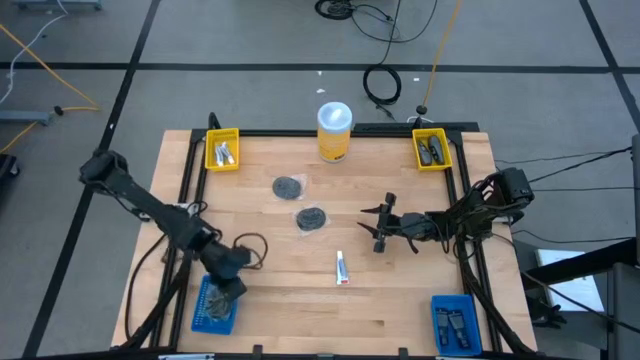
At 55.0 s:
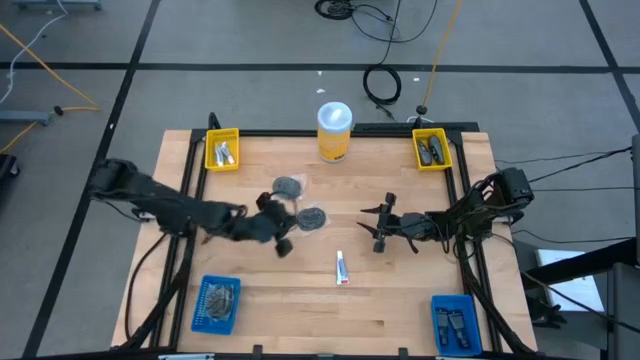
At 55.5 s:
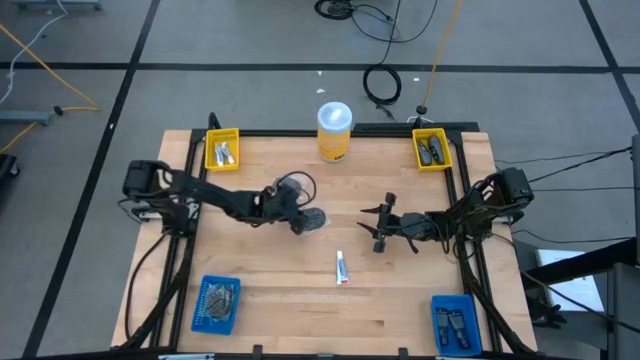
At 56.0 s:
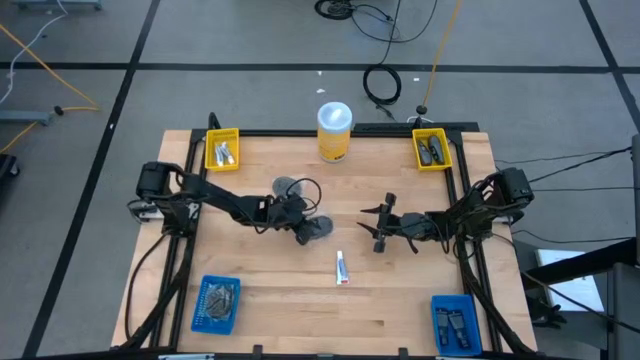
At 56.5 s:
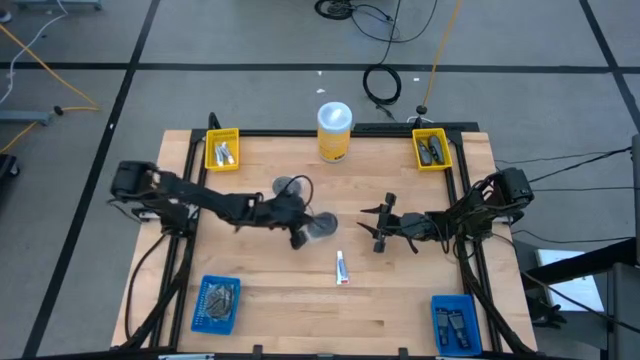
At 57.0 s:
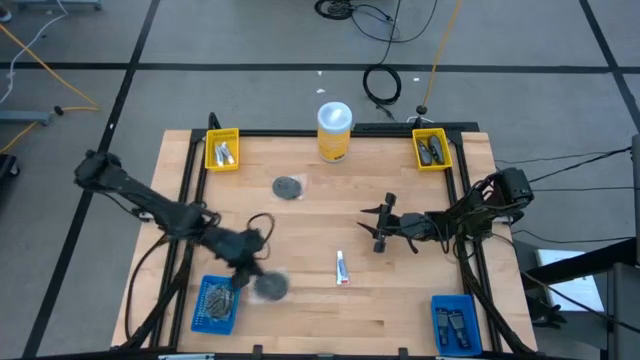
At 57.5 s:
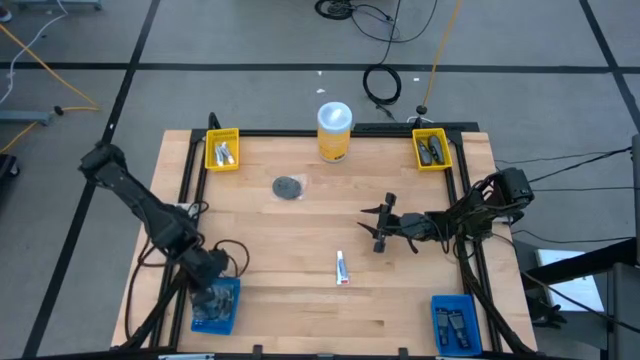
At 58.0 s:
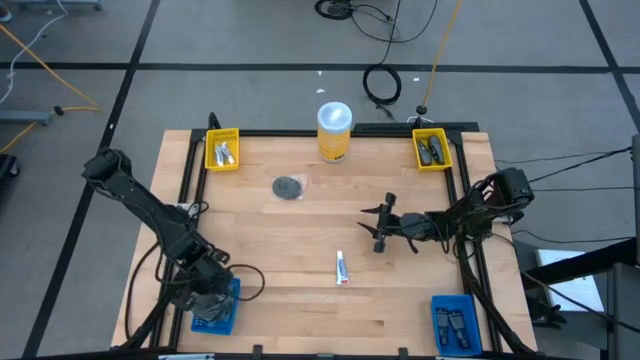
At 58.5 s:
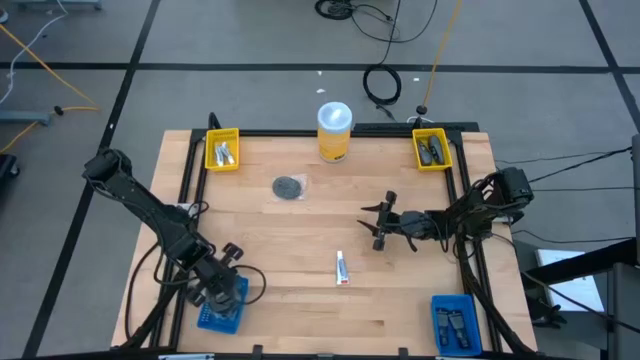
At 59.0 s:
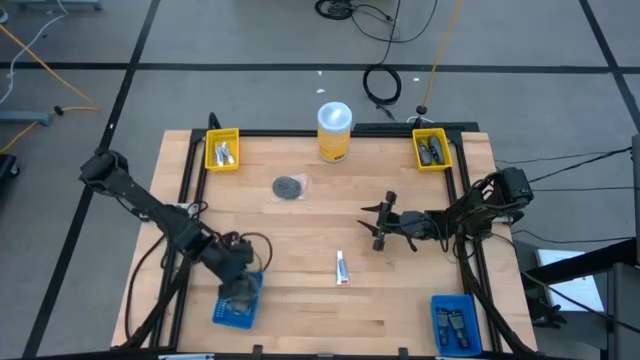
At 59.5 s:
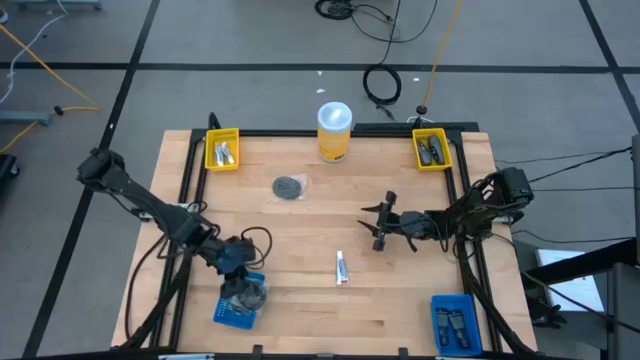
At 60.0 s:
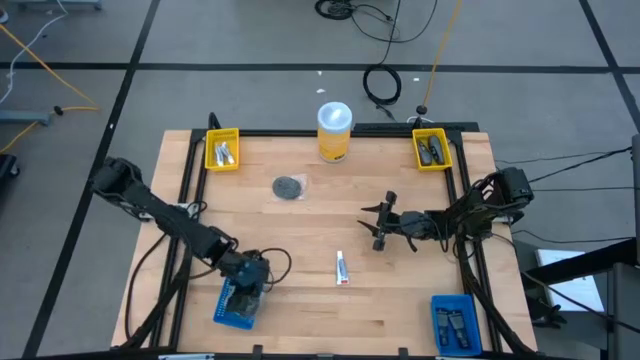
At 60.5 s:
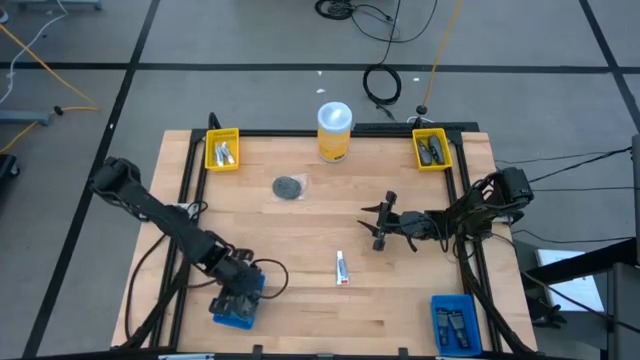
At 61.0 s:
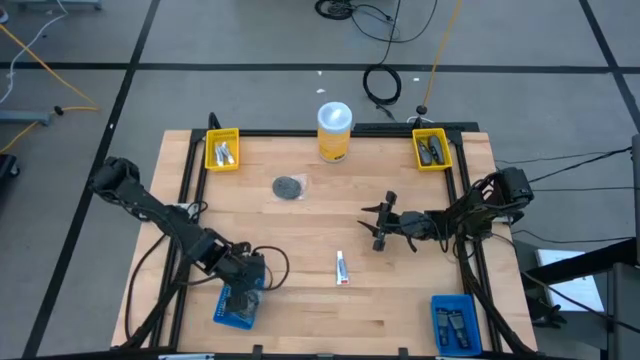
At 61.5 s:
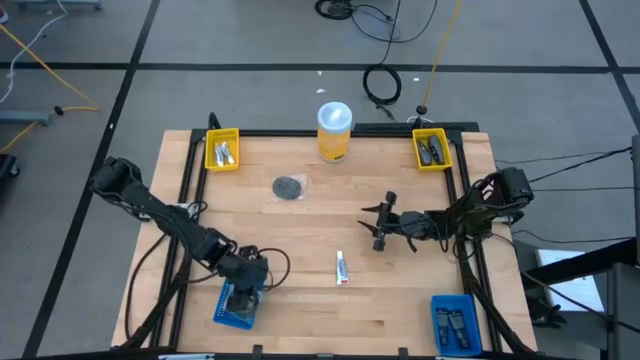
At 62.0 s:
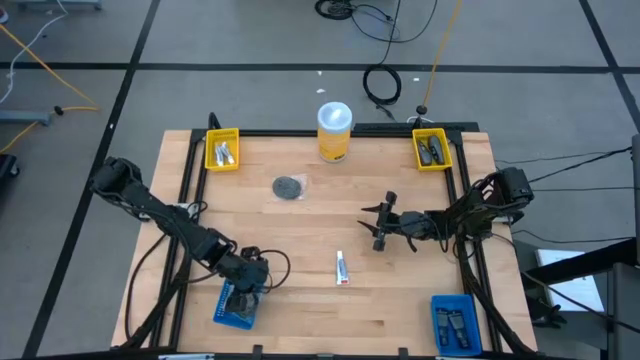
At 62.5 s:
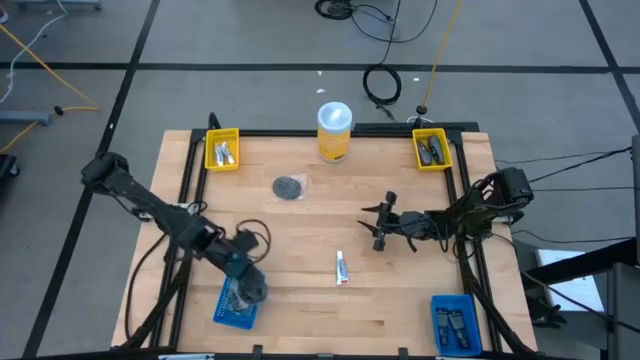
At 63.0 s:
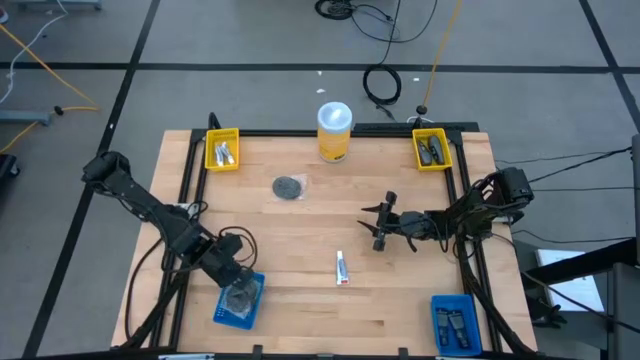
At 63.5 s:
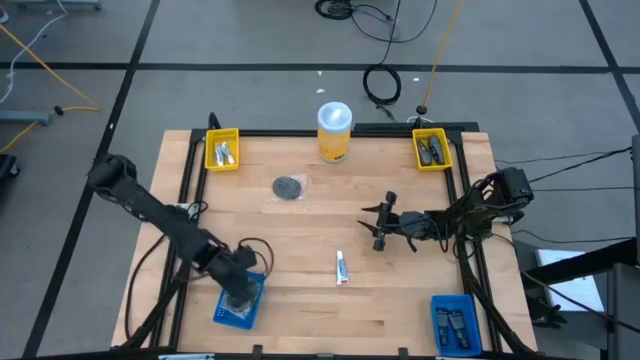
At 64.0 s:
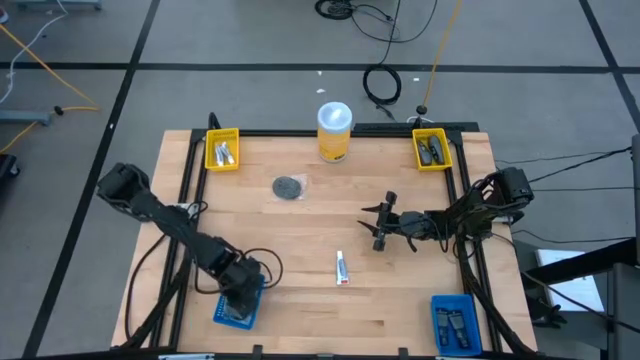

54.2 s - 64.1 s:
Task: Pick & Place Travel size toiletries
Put the black hairbrush into the left blue bin

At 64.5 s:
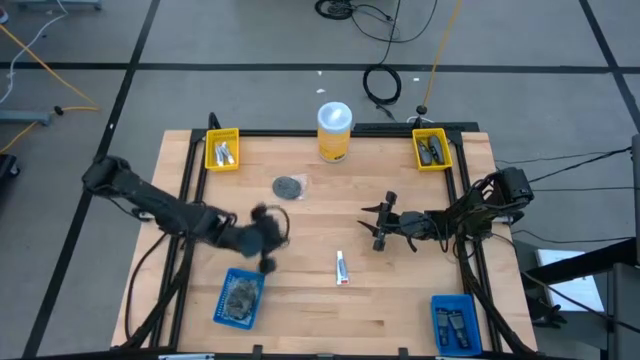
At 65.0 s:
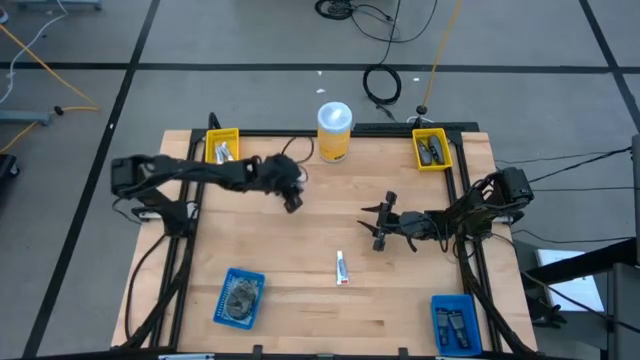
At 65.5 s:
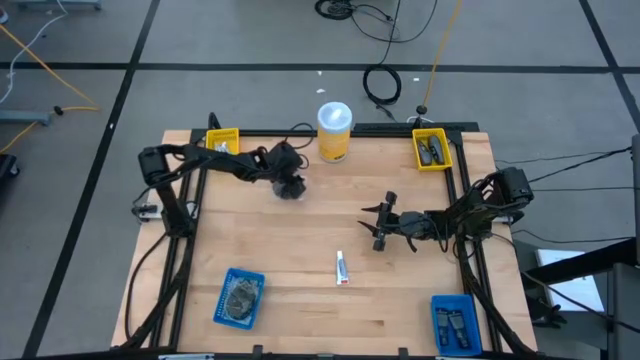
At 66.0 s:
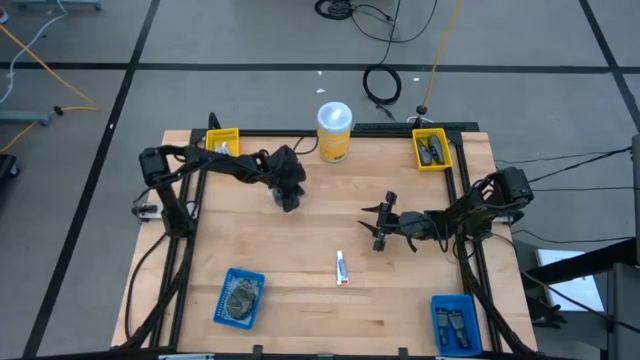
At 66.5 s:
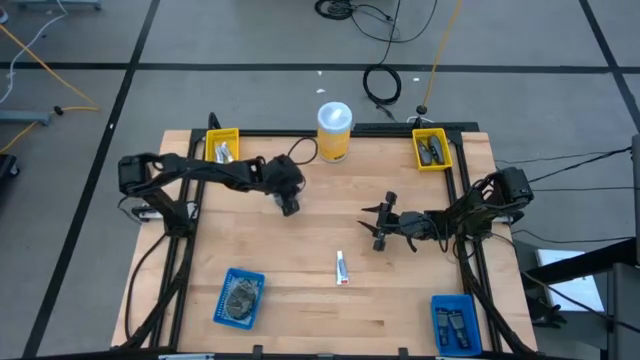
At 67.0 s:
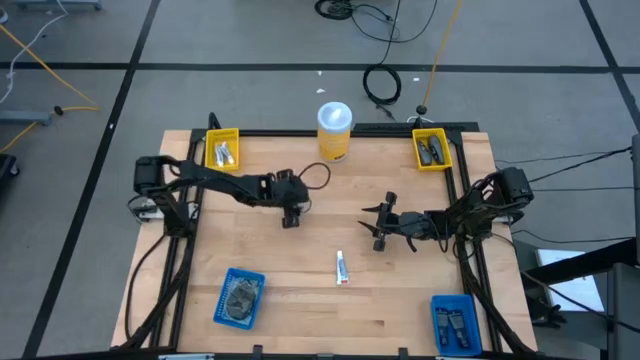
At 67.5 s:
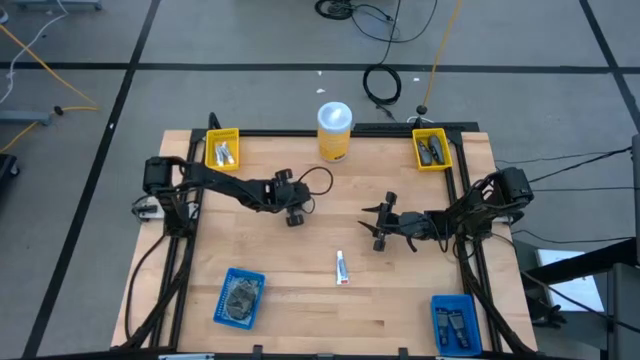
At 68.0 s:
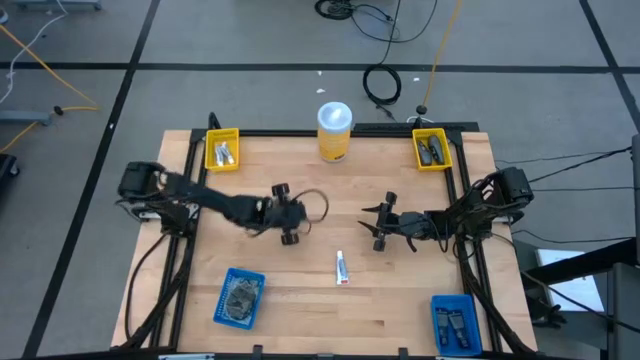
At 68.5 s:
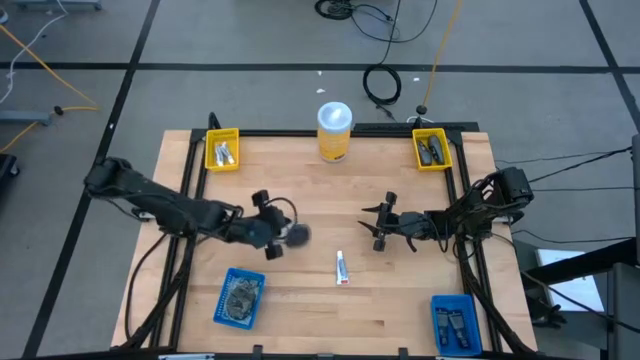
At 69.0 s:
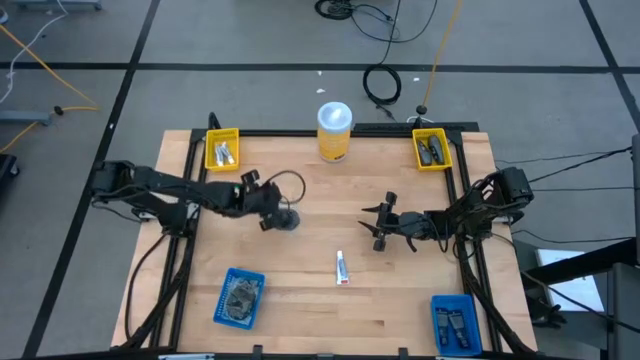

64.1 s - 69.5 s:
Put the black hairbrush into the left blue bin

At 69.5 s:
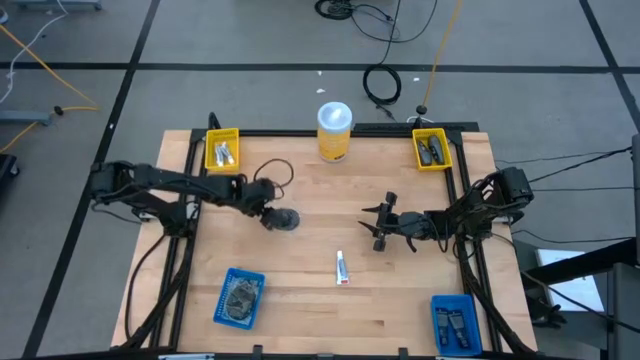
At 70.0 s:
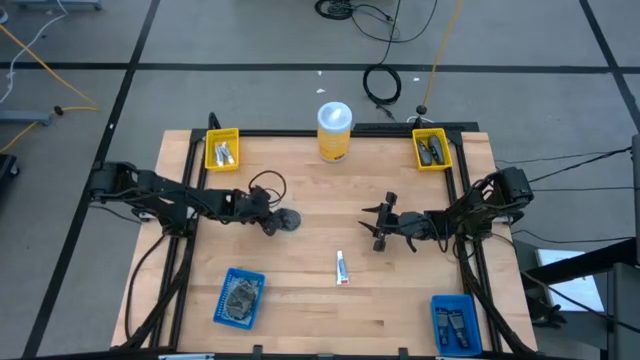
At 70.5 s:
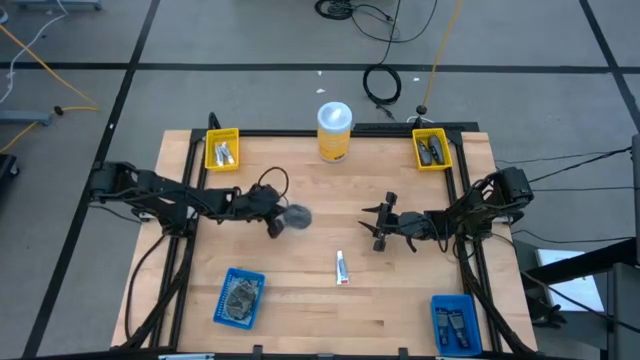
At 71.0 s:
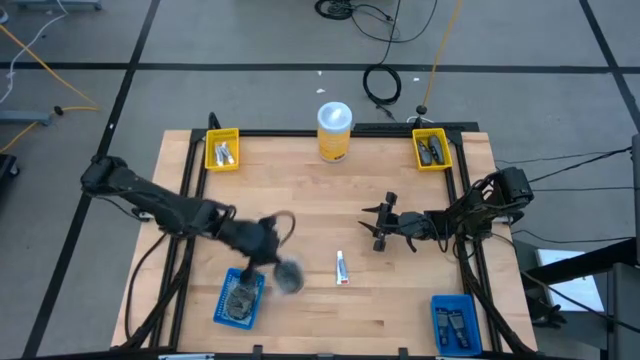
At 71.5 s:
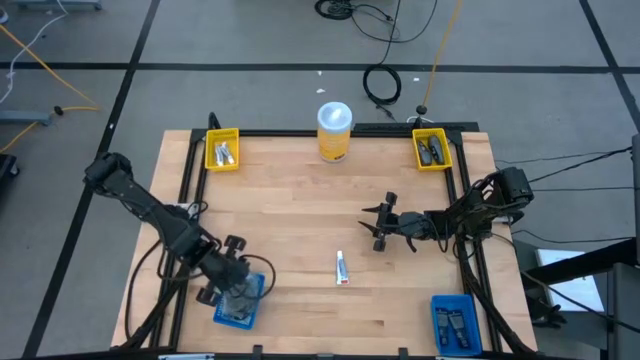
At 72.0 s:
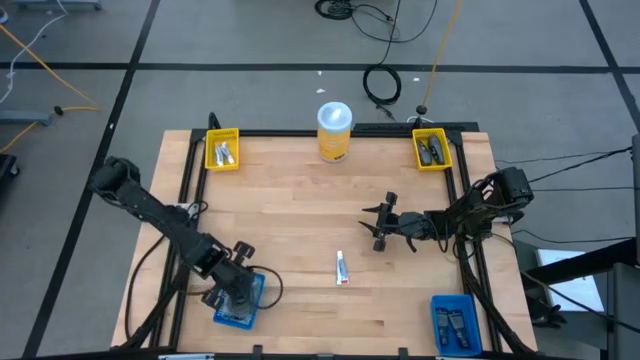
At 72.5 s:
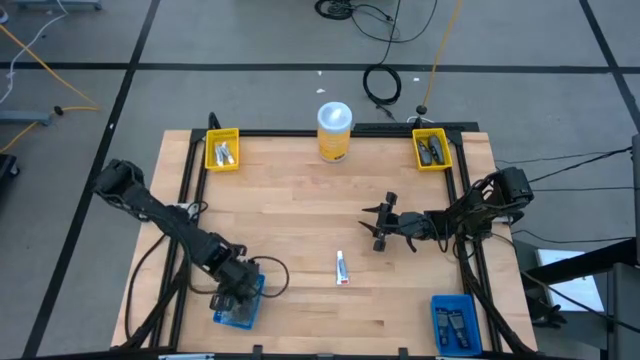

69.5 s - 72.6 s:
Put the black hairbrush into the left blue bin

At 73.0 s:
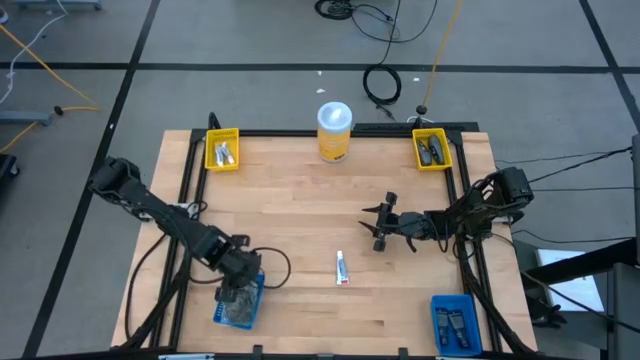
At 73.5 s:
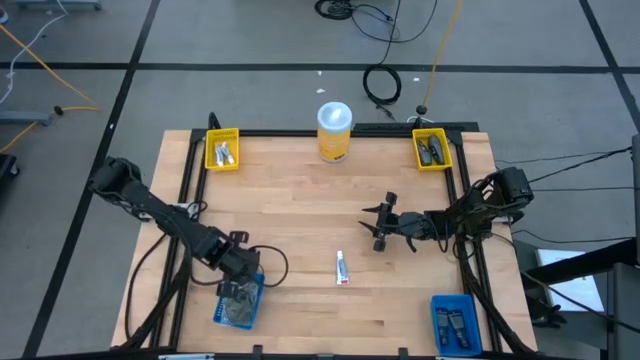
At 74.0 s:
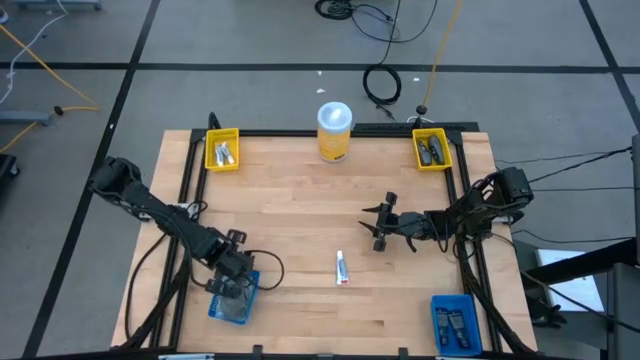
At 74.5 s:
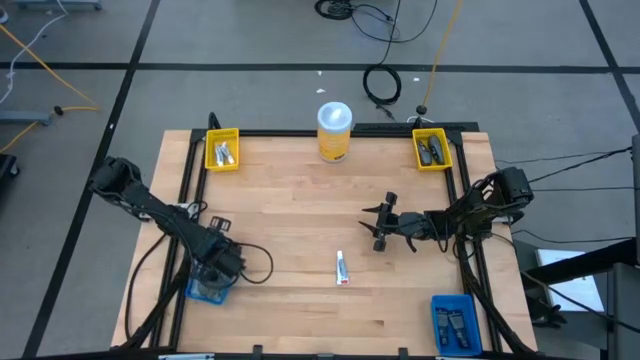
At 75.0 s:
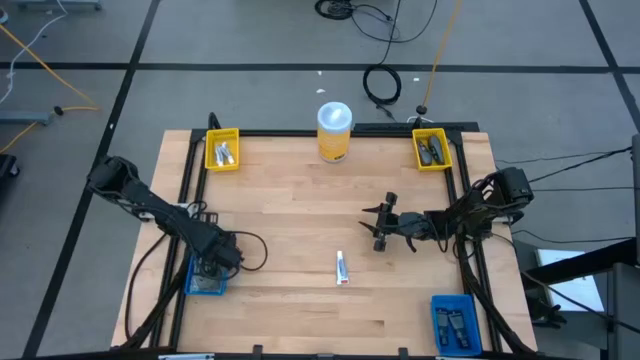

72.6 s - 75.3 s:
Adjust the left blue bin to the middle left of the table
